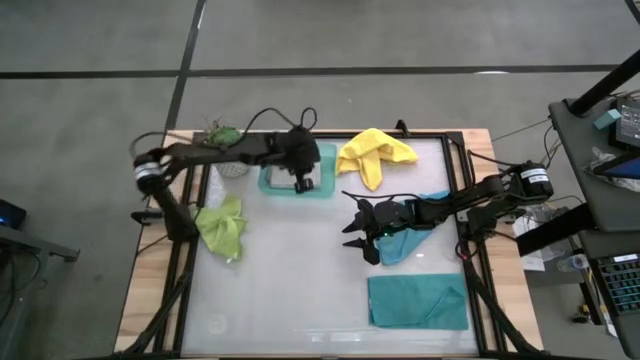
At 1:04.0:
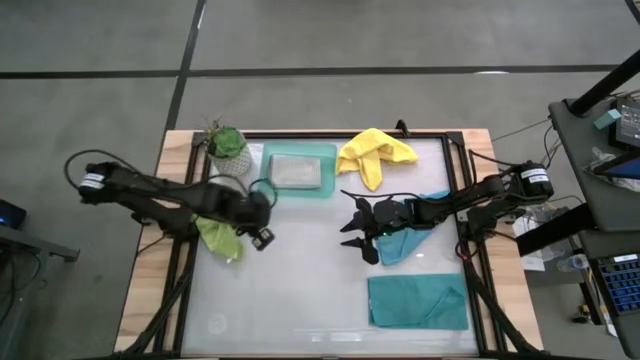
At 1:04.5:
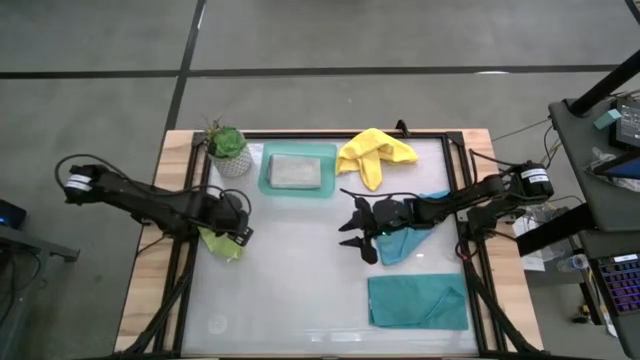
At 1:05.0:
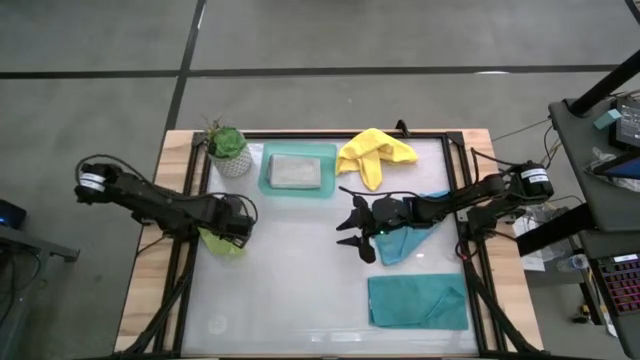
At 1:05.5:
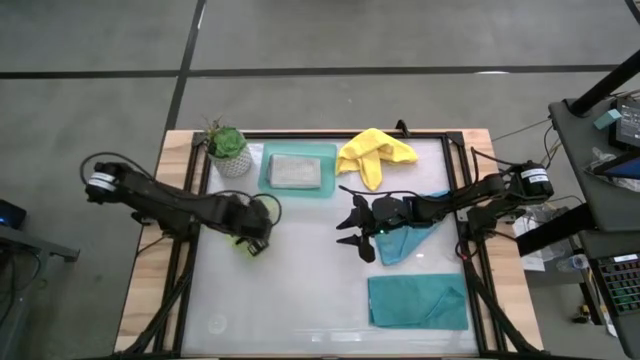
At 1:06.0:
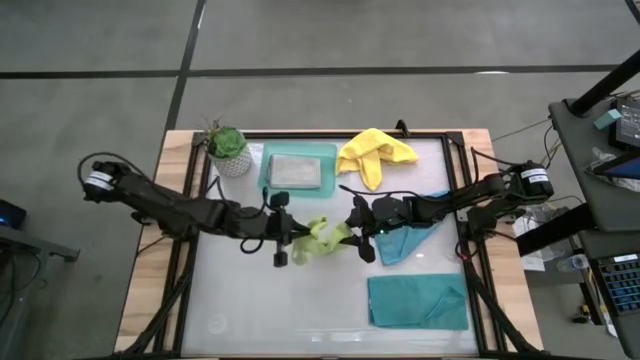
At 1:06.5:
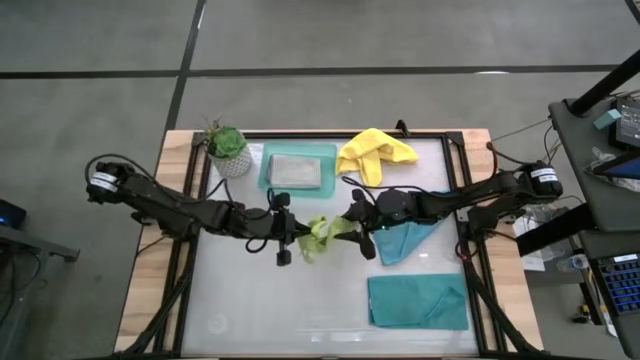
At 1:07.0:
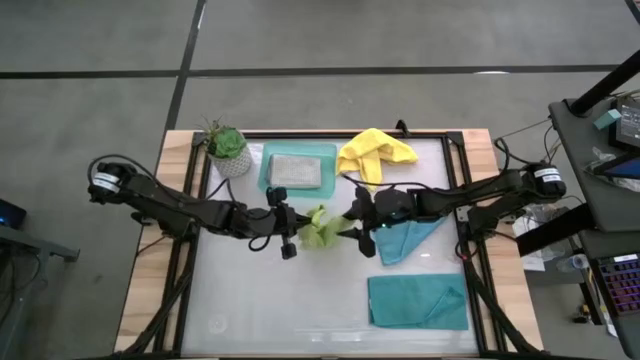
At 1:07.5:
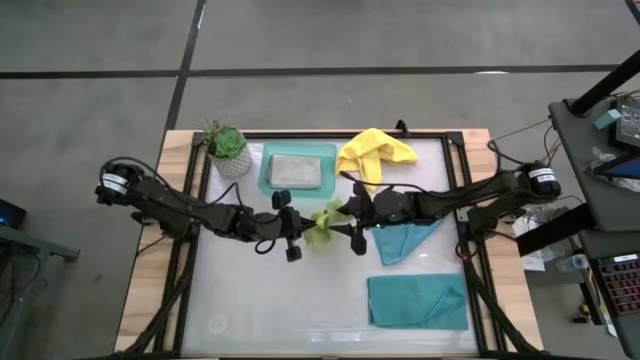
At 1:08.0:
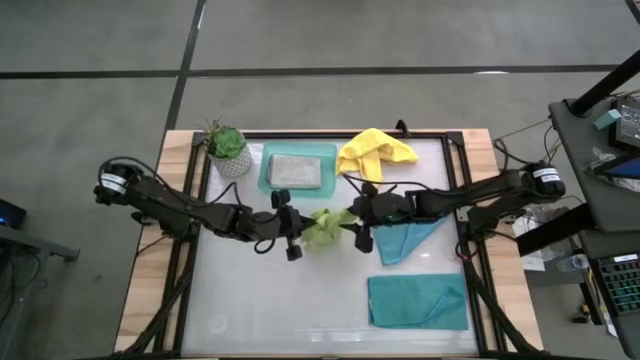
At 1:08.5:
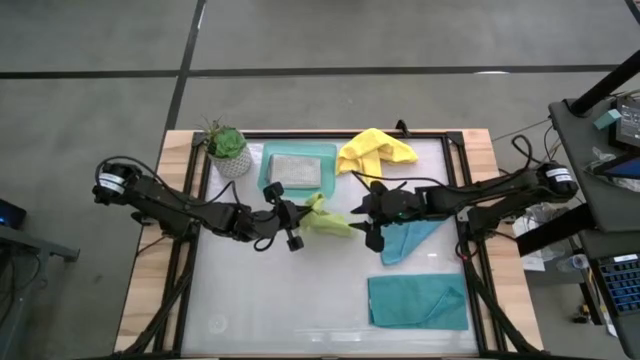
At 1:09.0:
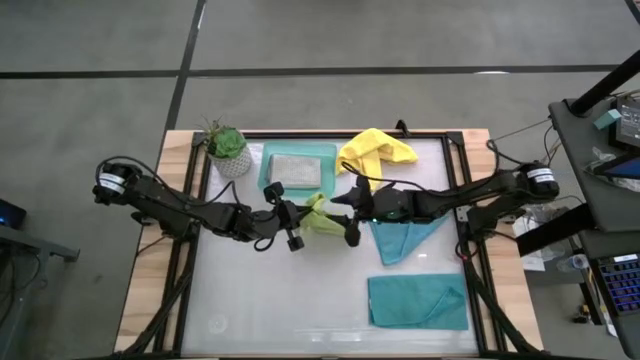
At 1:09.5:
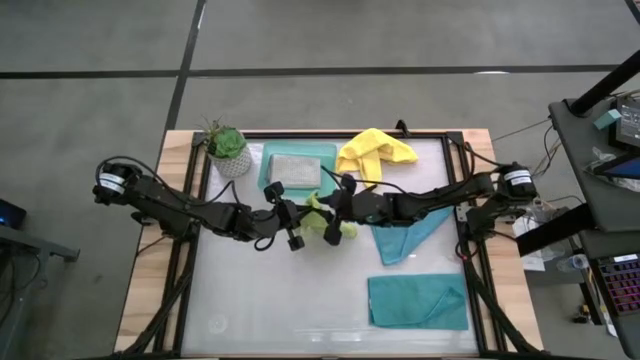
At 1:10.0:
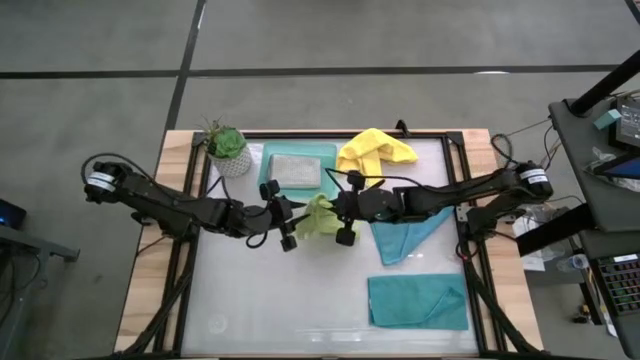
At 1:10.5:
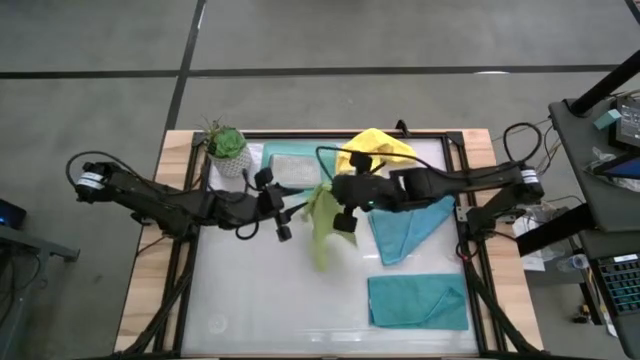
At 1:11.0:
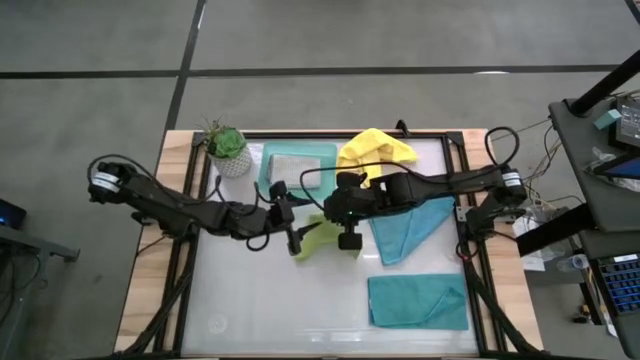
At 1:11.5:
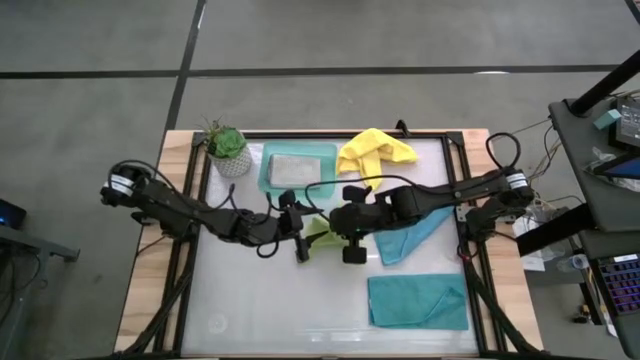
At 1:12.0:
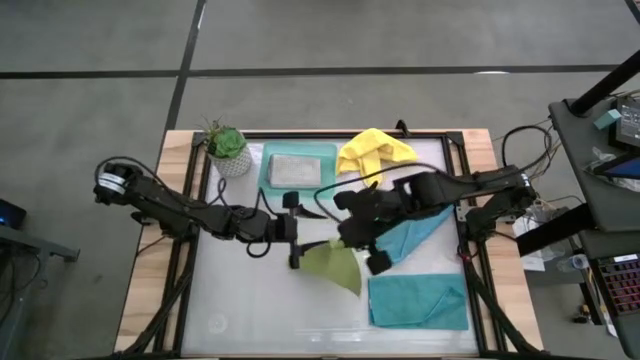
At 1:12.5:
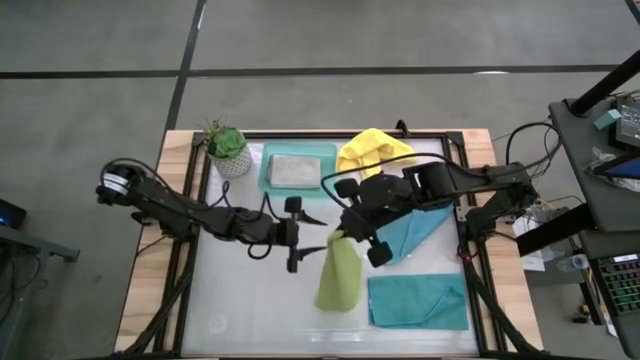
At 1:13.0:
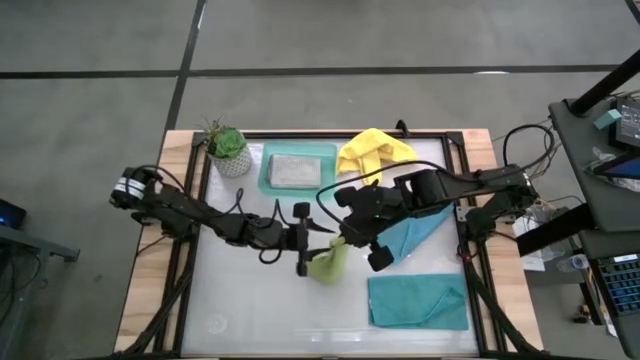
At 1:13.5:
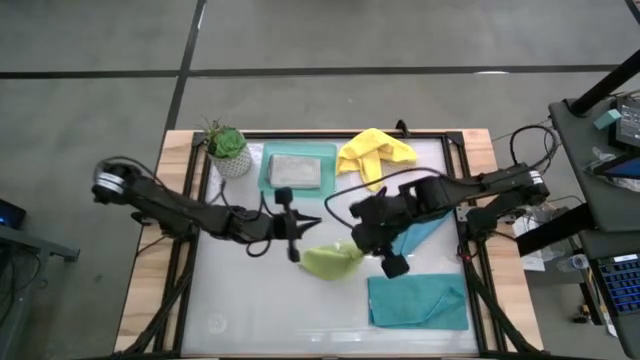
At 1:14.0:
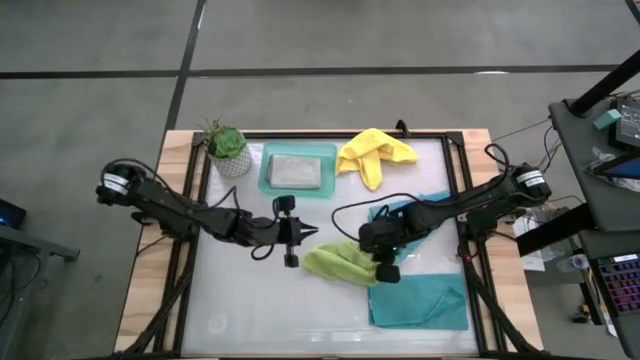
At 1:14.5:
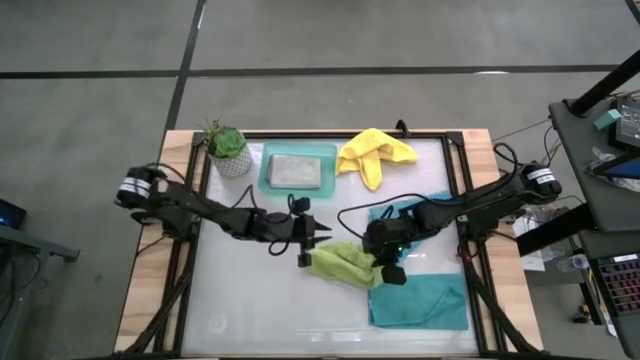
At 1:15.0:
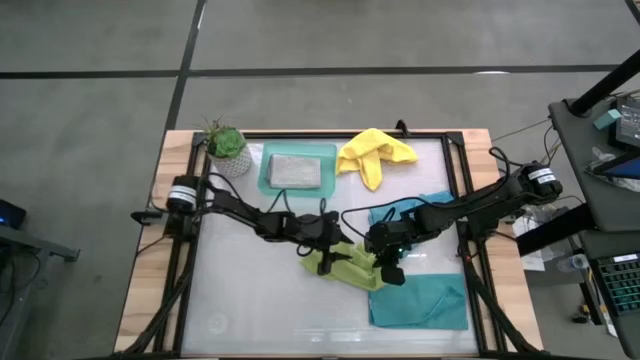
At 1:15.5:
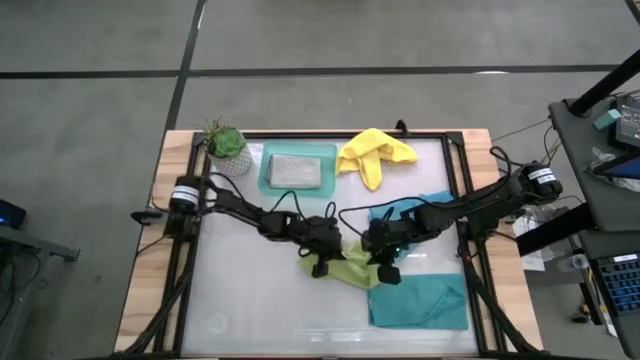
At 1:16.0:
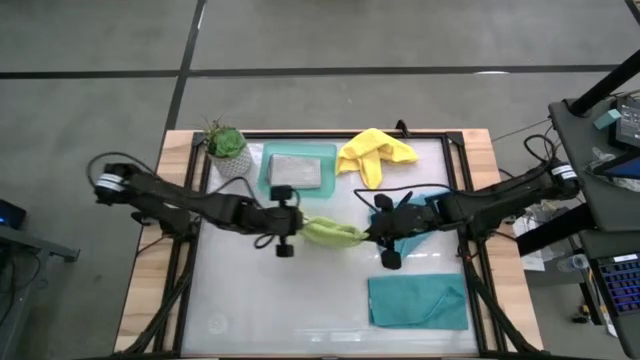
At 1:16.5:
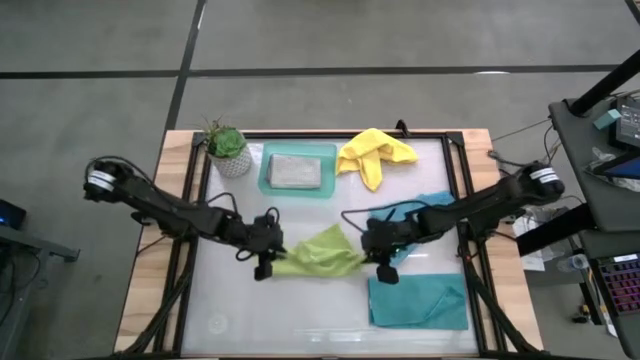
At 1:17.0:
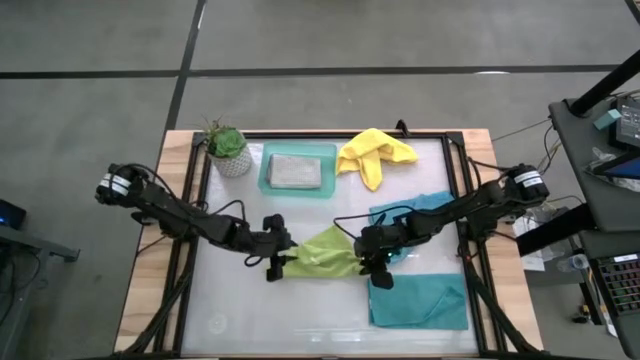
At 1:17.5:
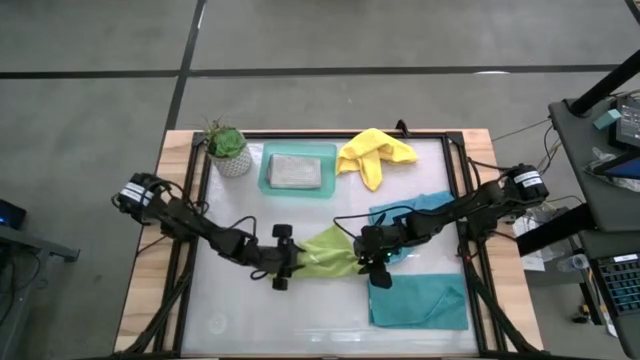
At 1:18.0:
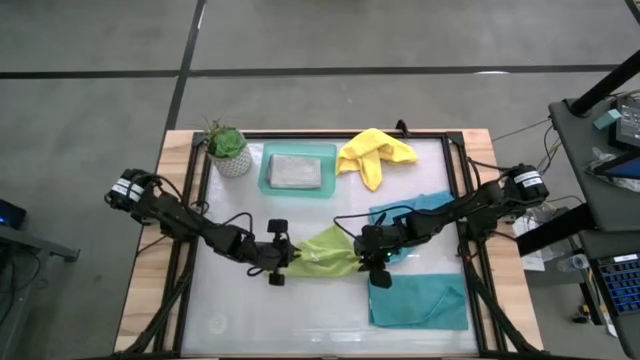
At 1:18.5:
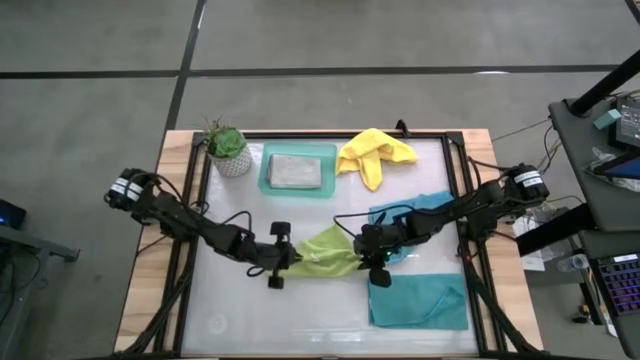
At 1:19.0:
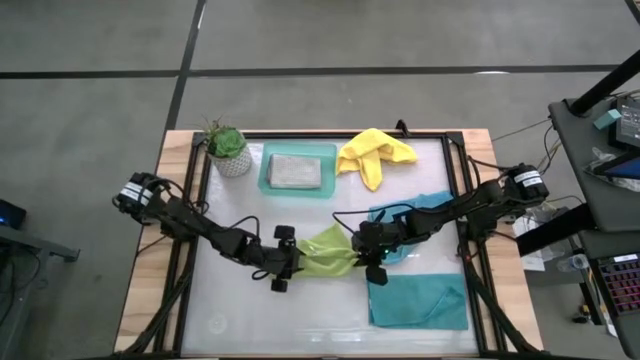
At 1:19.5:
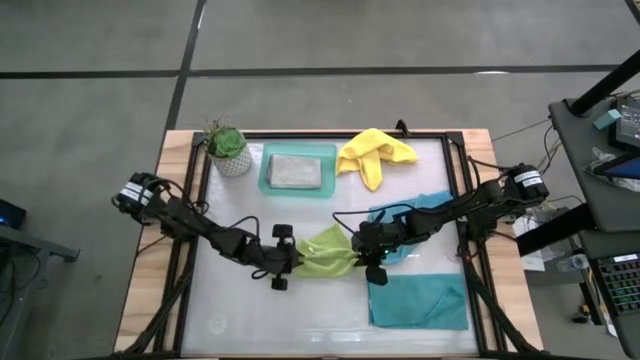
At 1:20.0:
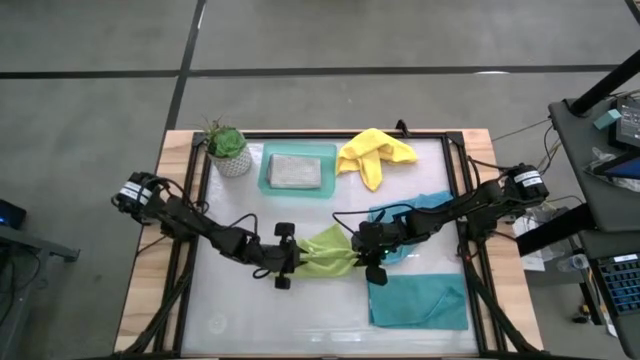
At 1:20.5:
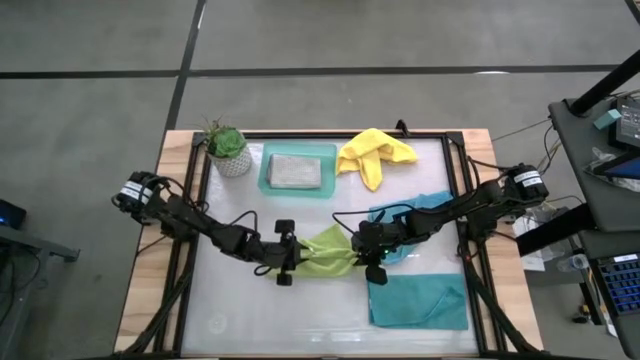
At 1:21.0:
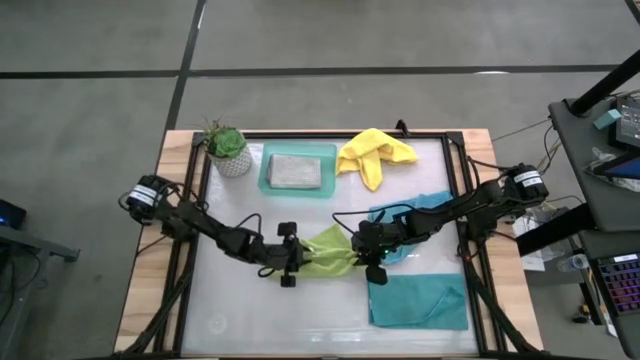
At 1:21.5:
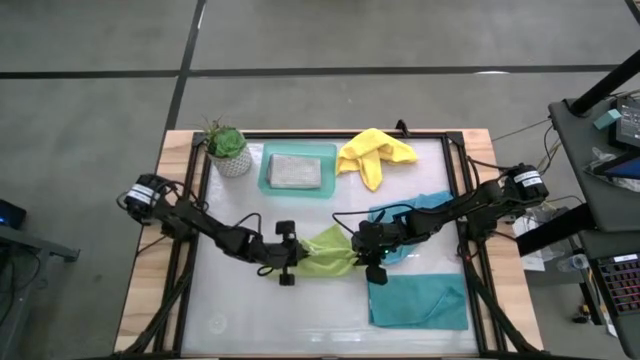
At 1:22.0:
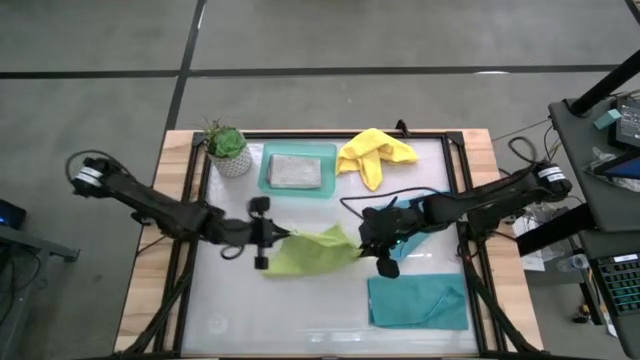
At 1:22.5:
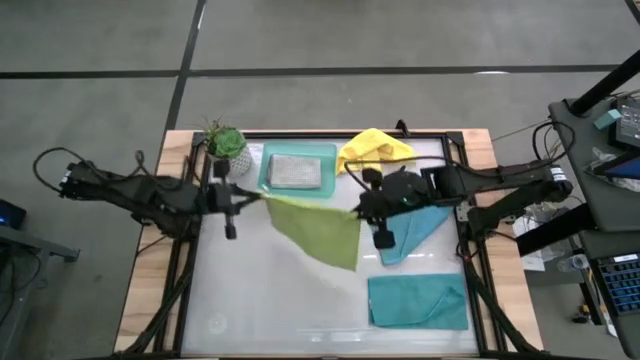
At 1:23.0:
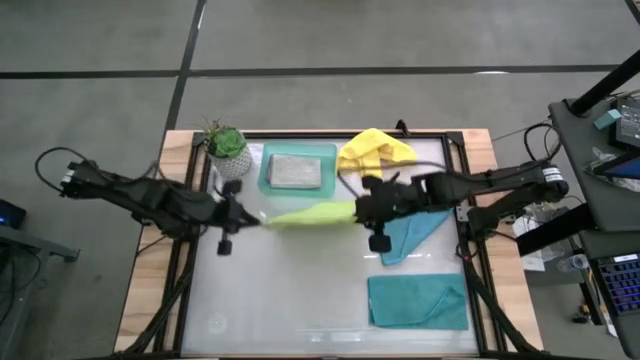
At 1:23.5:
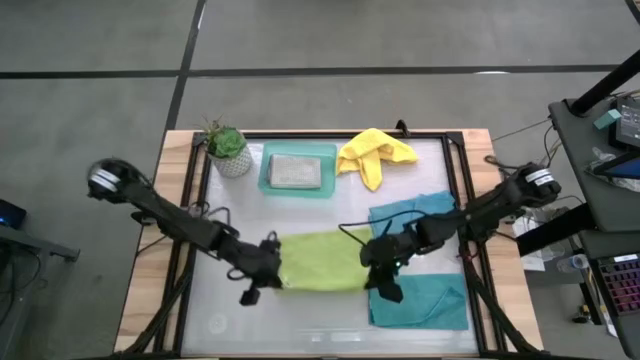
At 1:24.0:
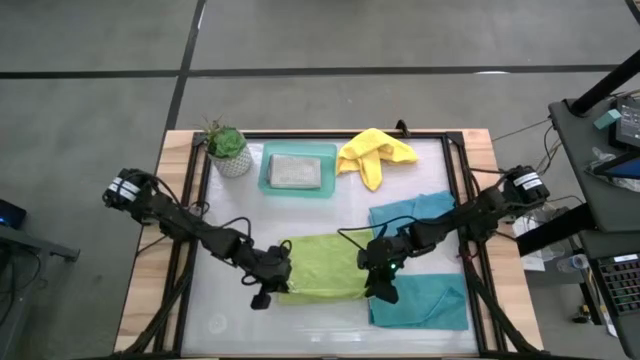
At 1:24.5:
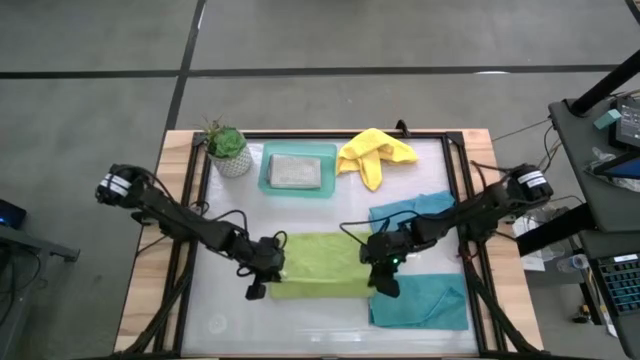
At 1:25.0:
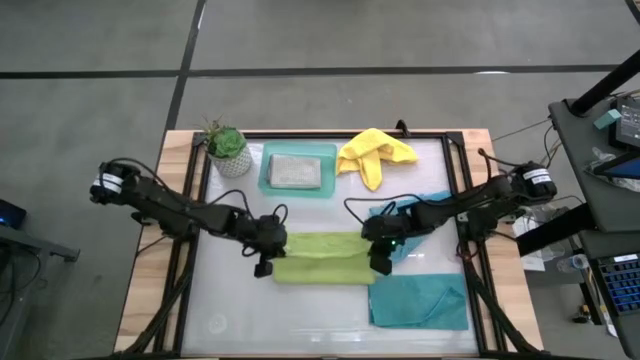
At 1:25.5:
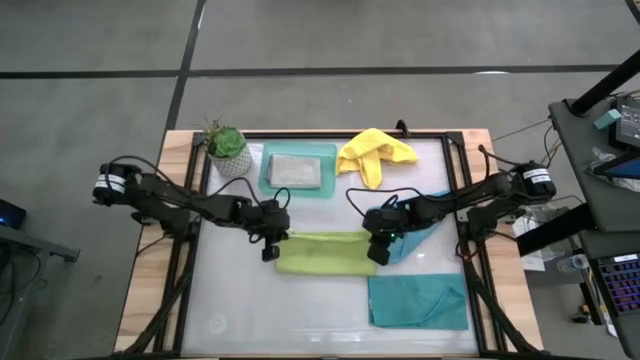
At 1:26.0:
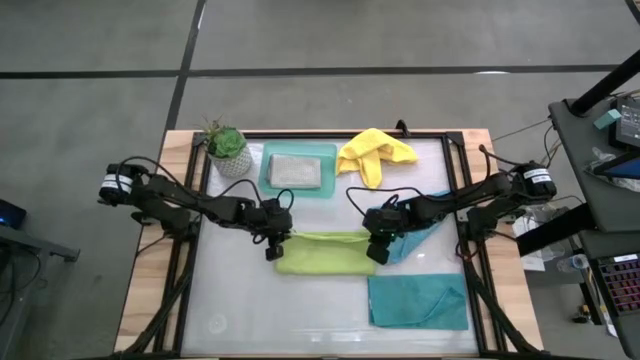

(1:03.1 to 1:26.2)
Task: Fold microfiber towels
Fold the green microfiber towel
